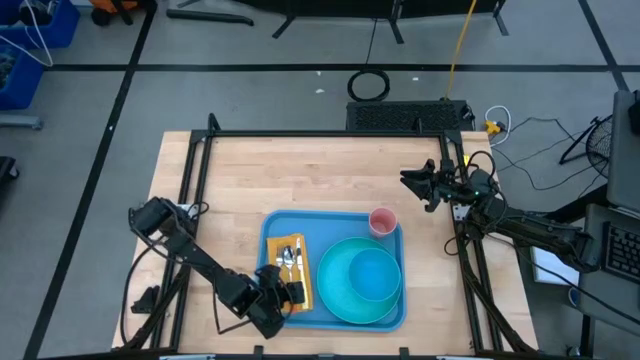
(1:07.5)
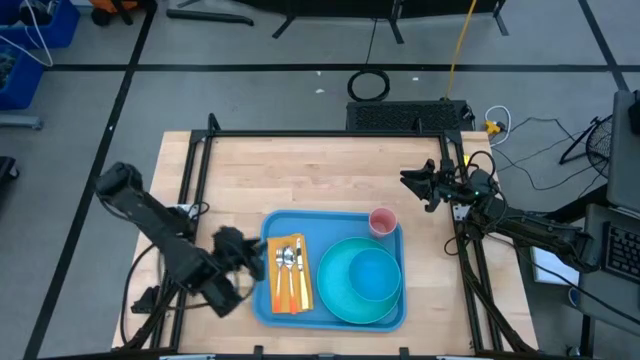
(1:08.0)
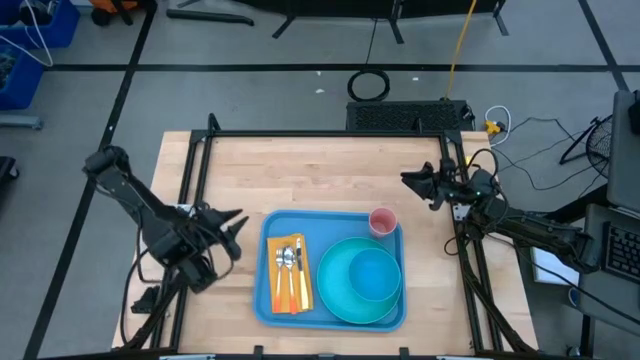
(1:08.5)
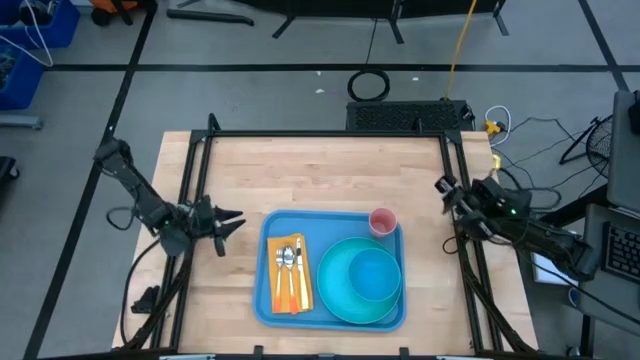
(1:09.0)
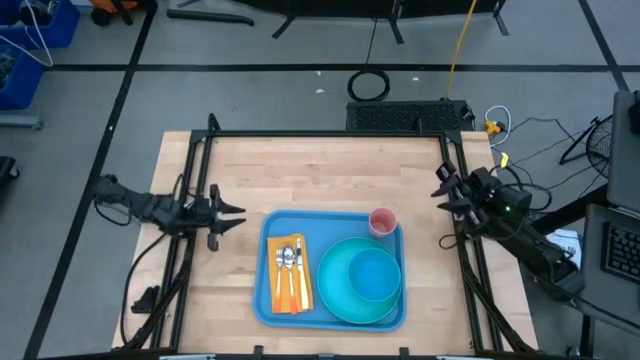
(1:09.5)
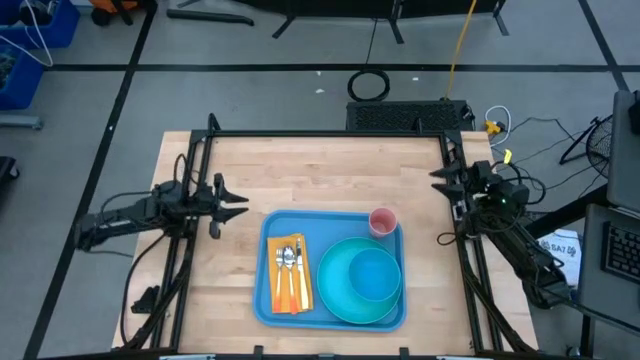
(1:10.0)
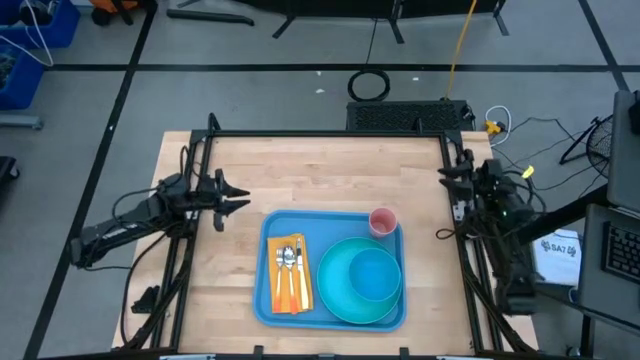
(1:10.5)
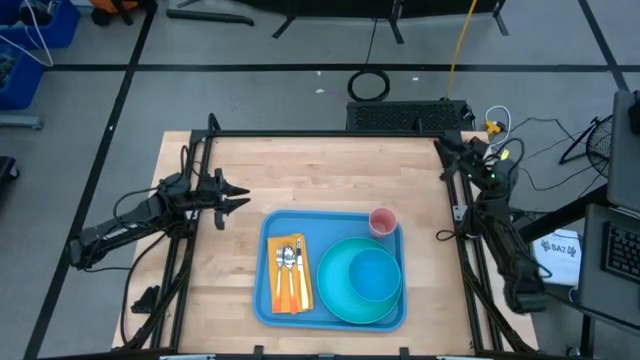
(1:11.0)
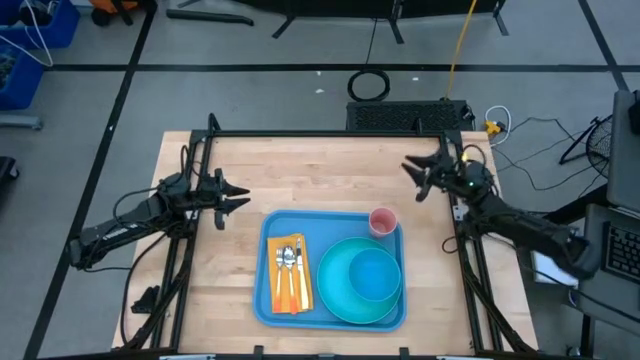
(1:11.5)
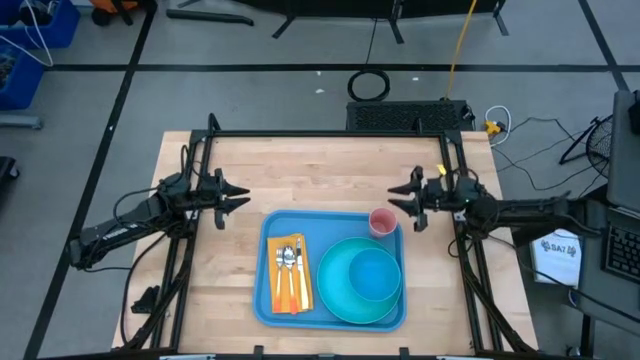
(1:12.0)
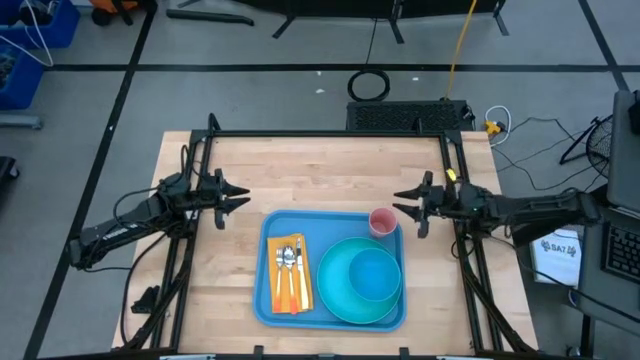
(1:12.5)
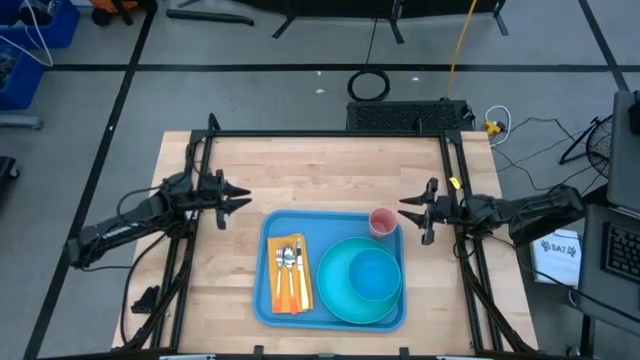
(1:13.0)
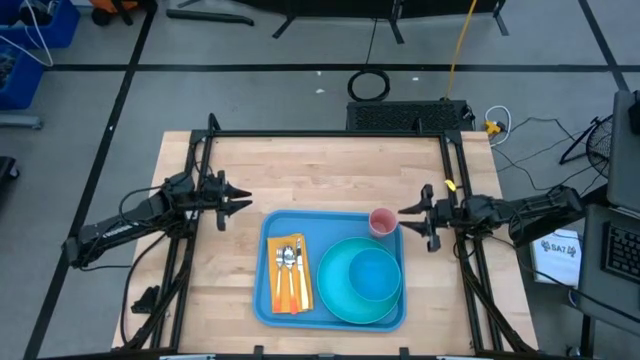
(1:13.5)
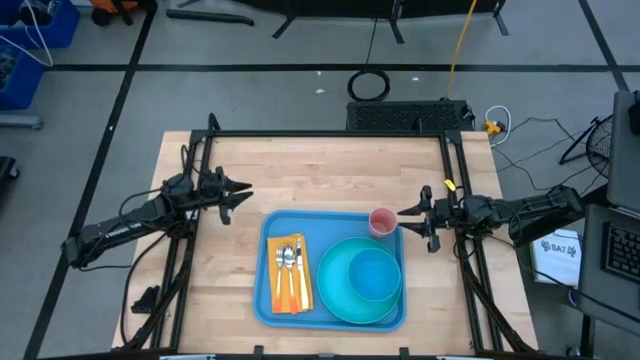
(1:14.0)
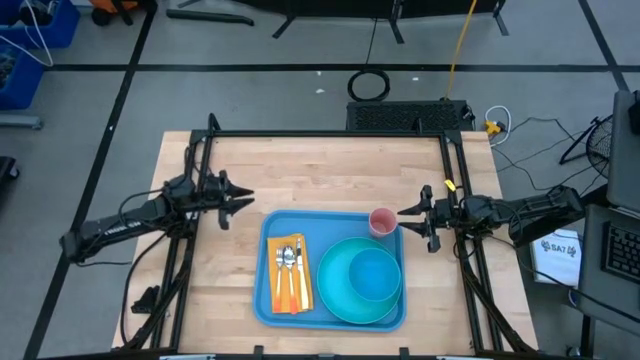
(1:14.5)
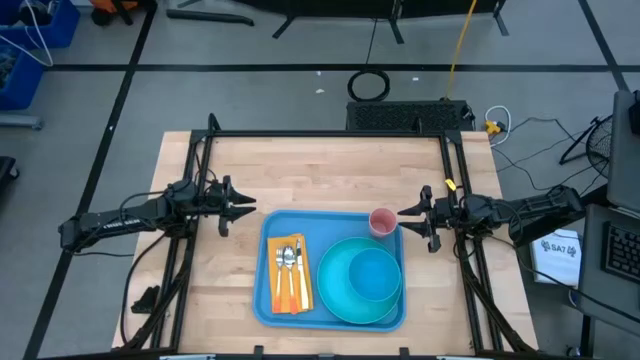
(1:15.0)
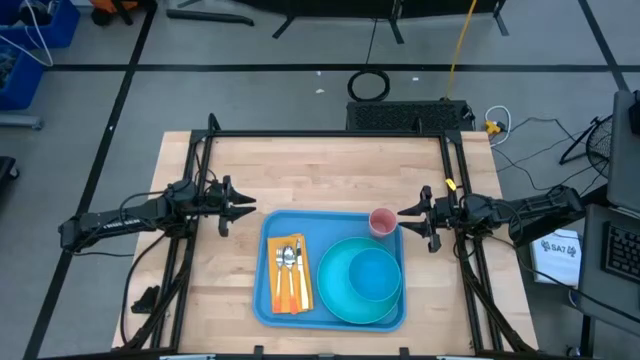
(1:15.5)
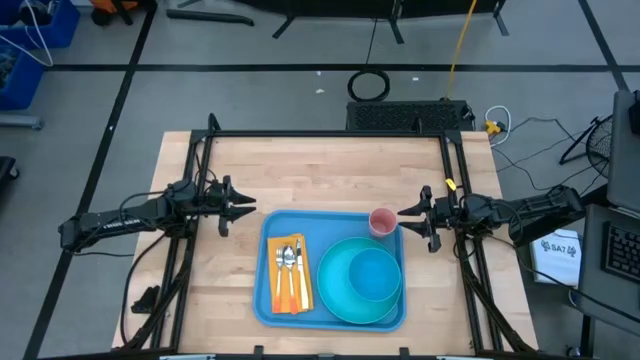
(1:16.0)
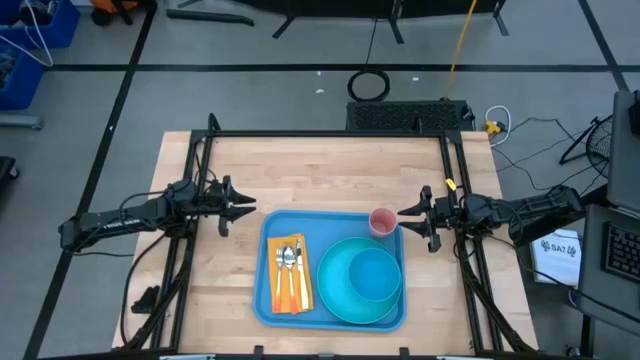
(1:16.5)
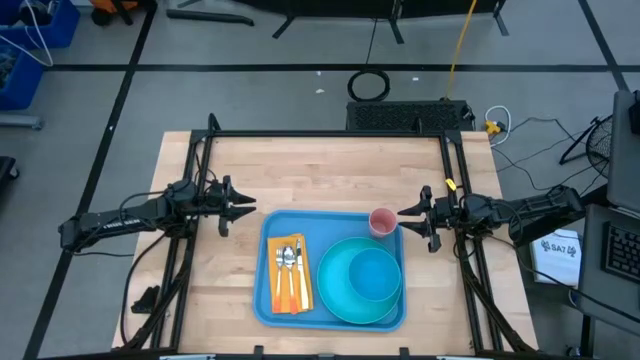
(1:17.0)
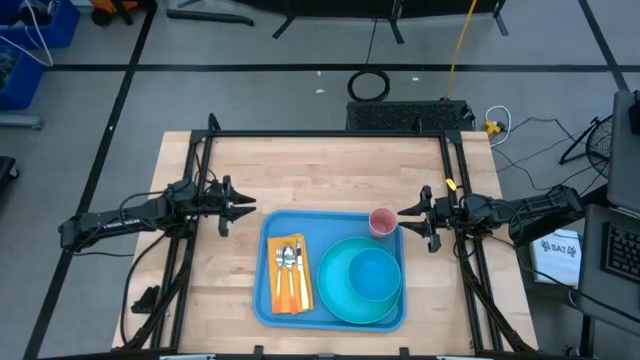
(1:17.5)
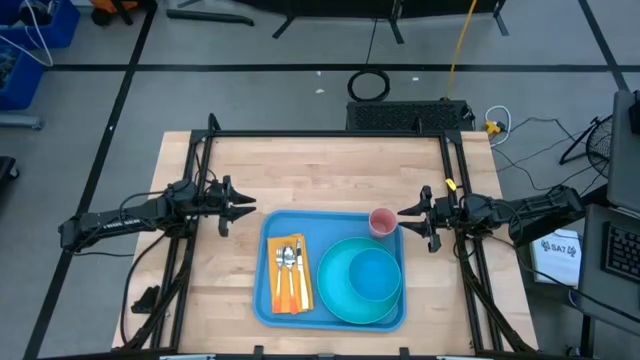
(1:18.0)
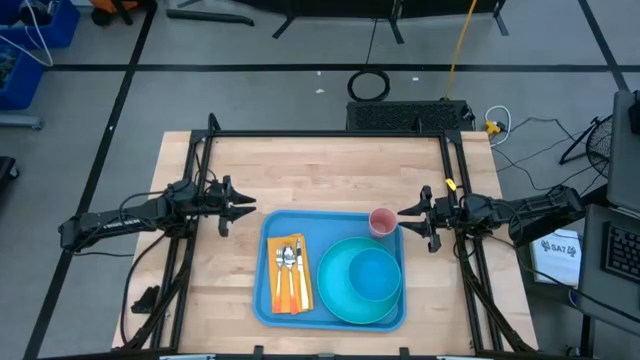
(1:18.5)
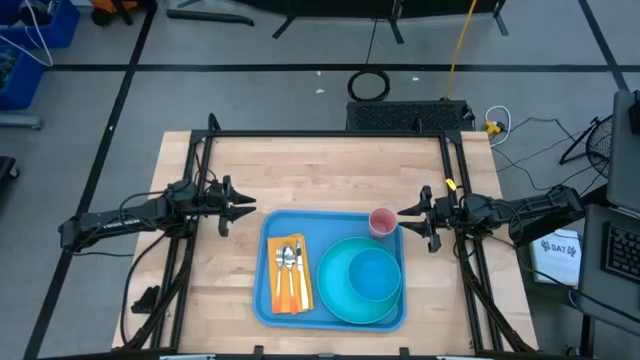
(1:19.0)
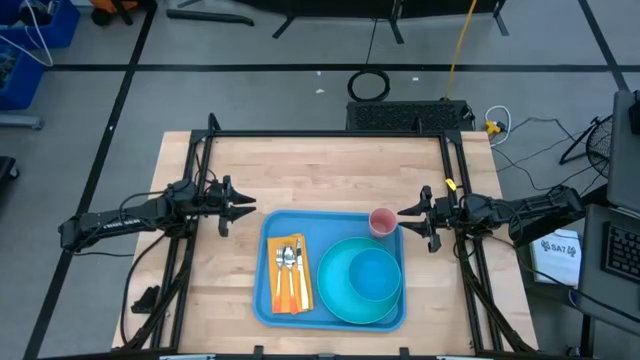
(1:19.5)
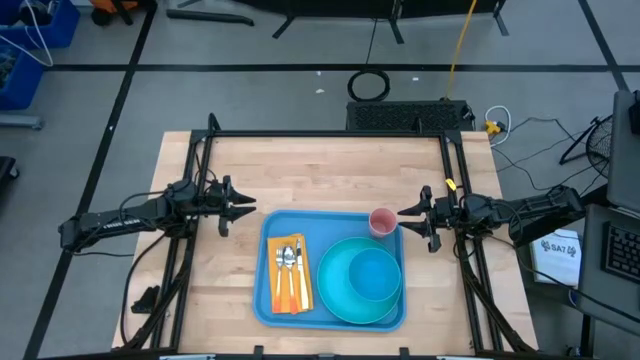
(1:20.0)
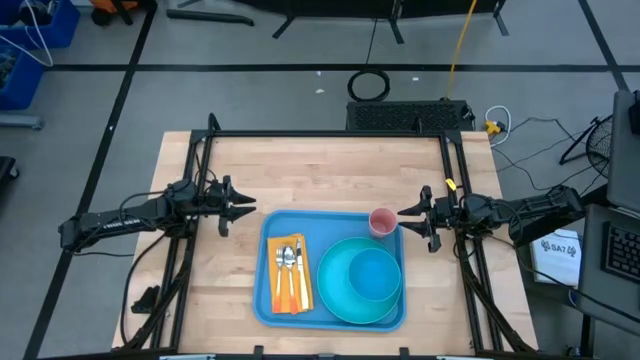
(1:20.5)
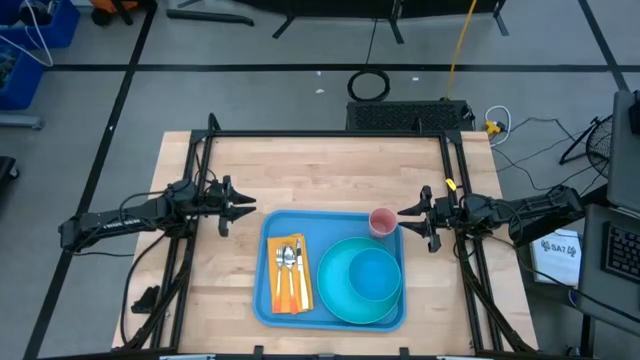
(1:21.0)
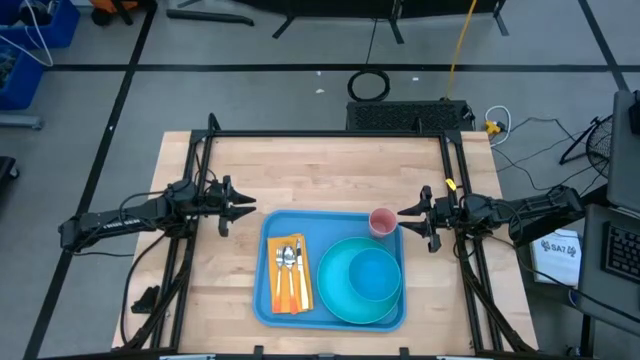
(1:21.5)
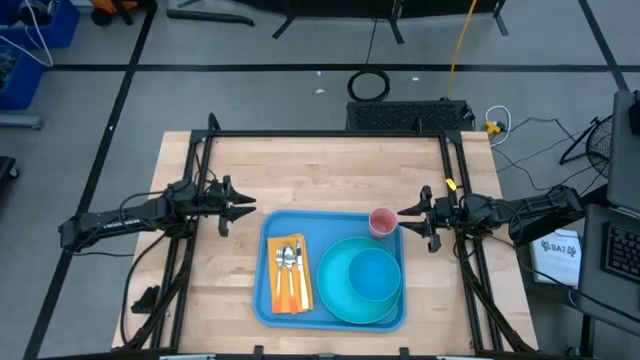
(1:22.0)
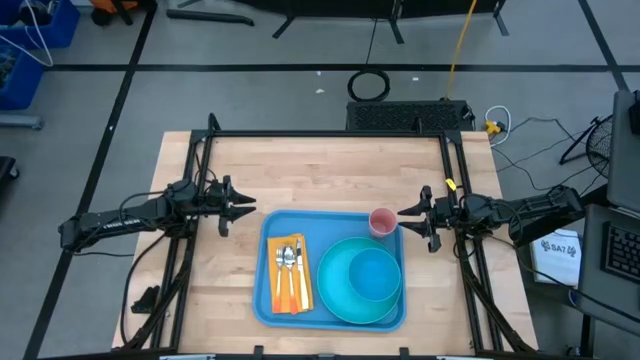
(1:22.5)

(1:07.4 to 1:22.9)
Task: Set up tray
Return to Home Position

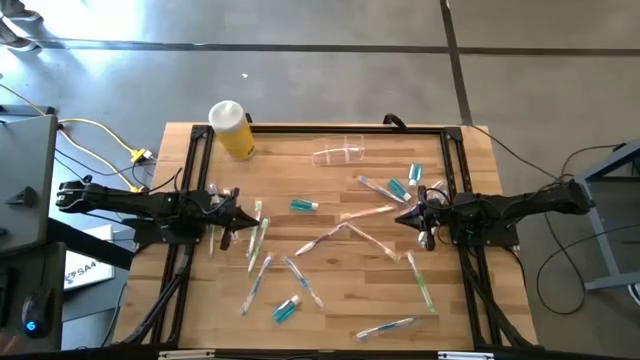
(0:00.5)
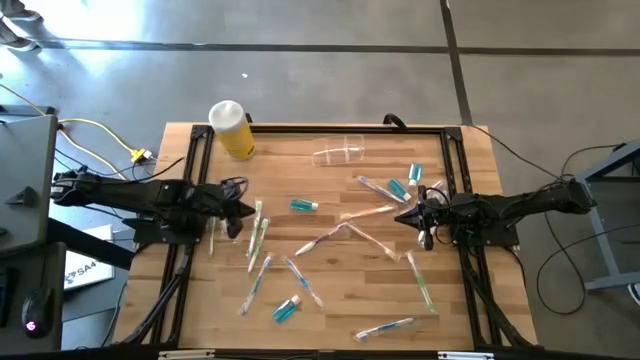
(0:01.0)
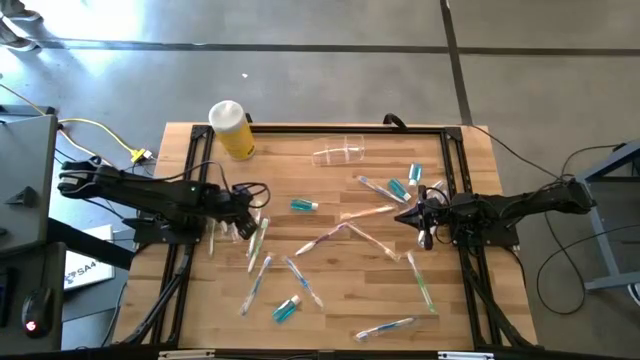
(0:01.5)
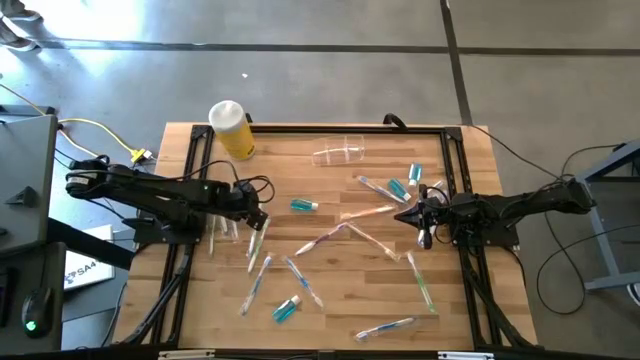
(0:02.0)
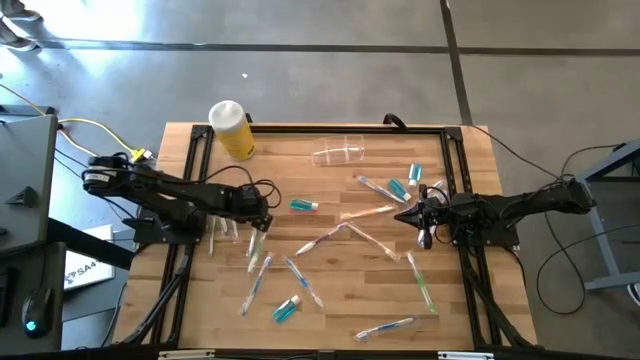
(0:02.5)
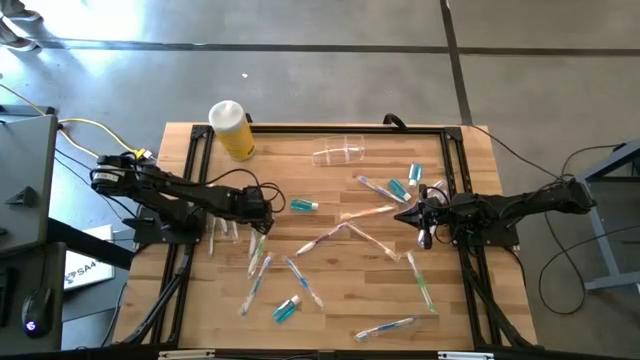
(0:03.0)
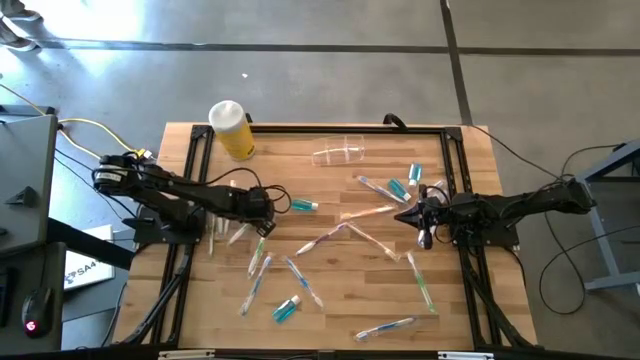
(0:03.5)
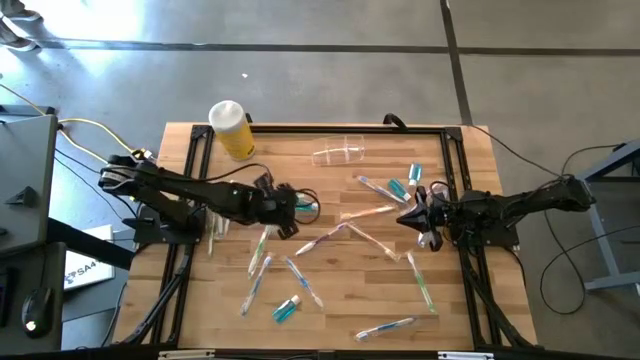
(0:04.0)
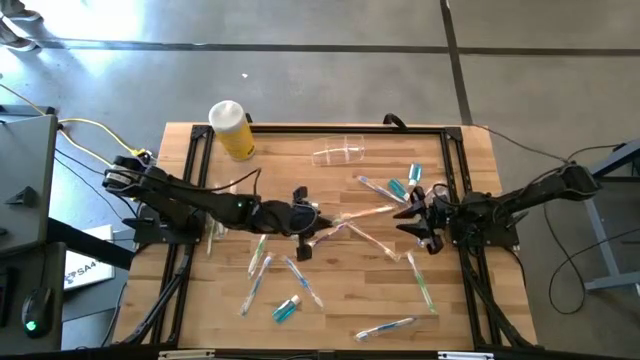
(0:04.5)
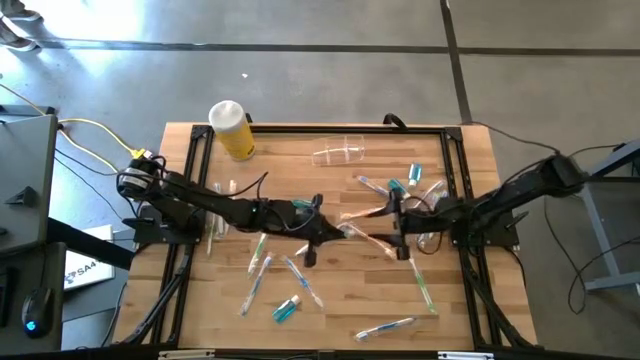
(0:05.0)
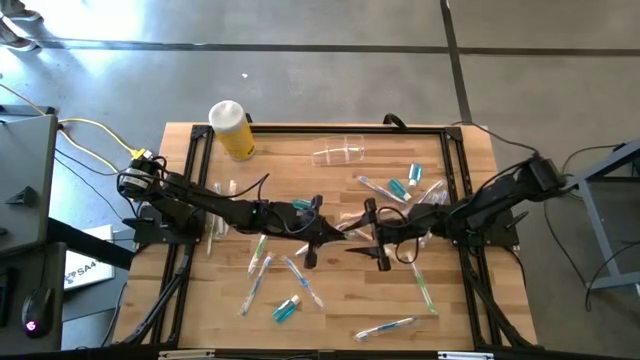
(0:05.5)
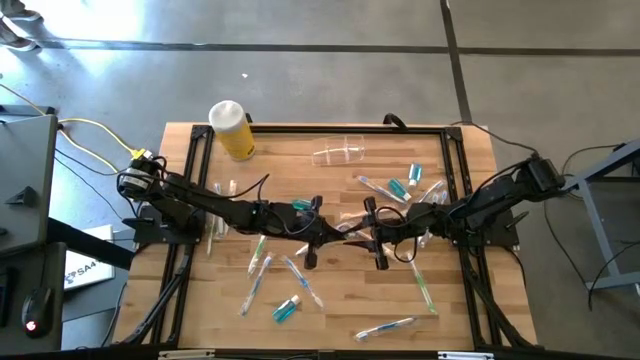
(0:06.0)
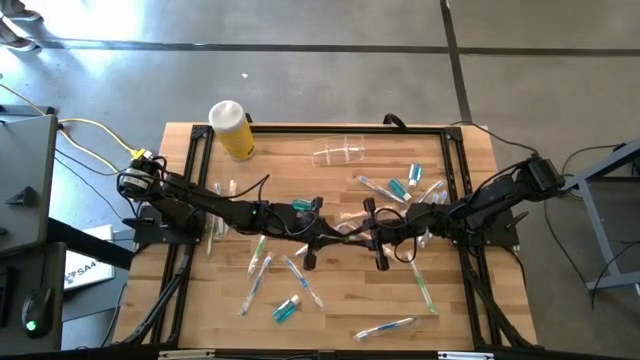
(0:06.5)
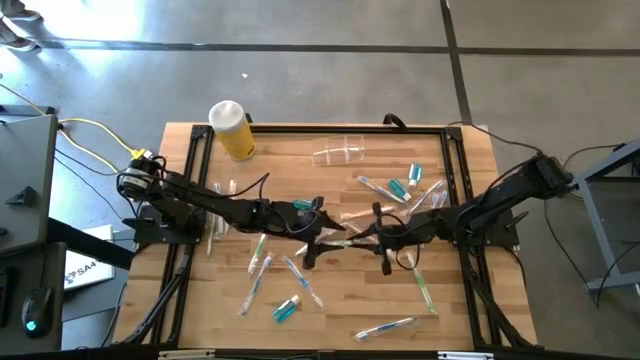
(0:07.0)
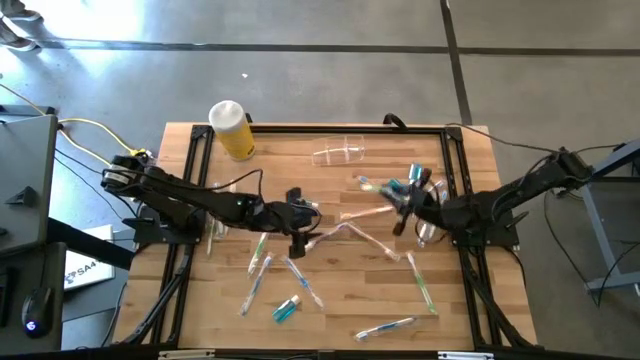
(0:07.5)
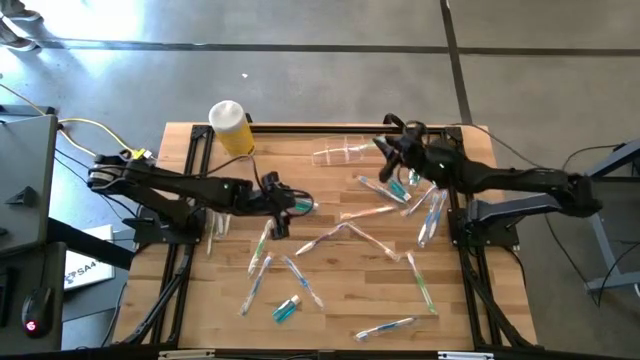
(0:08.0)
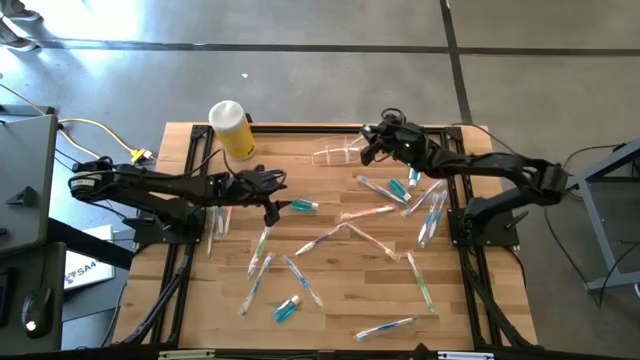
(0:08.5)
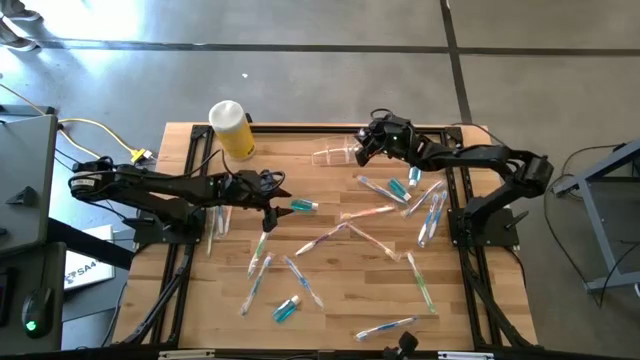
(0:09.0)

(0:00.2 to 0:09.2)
Task: Pick & Place toothbrushing station
Put the green toothbrush into the transparent organizer
